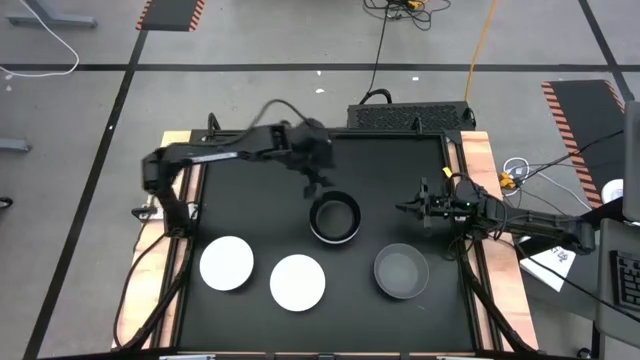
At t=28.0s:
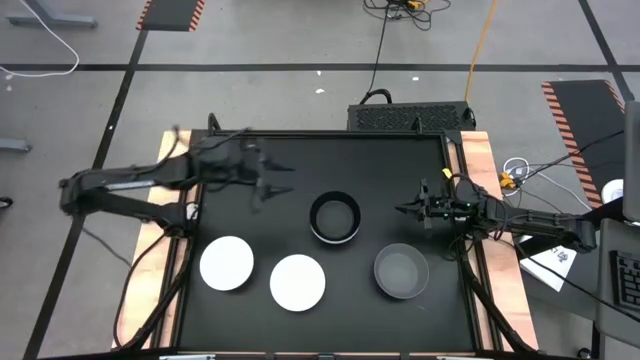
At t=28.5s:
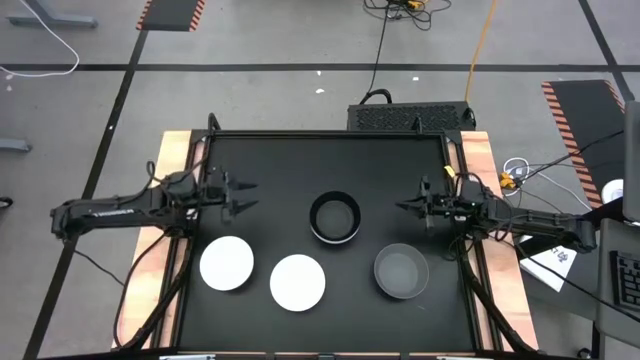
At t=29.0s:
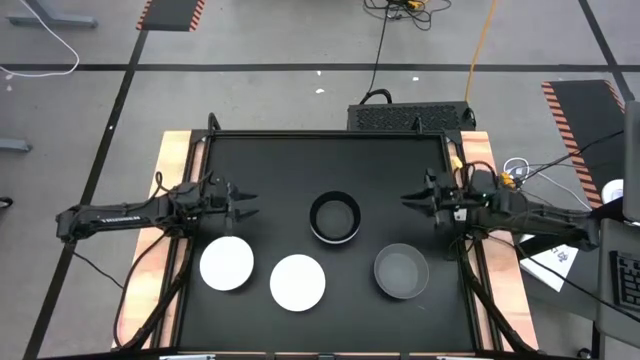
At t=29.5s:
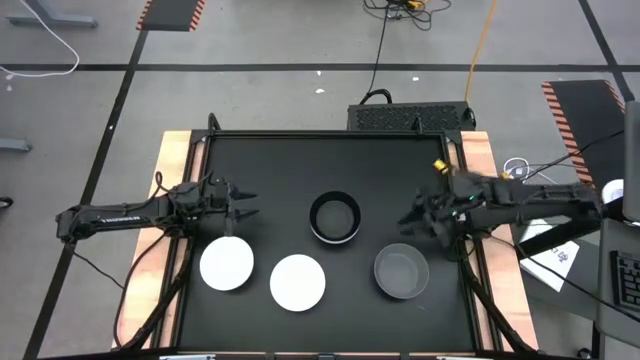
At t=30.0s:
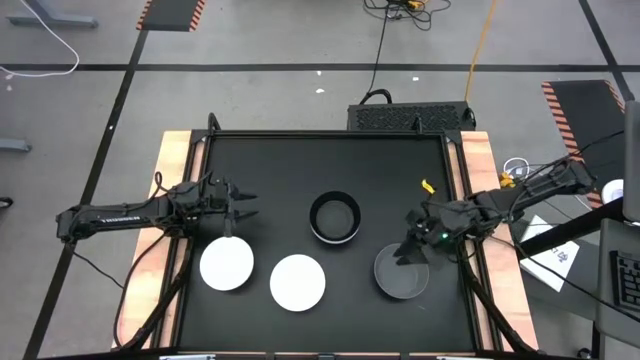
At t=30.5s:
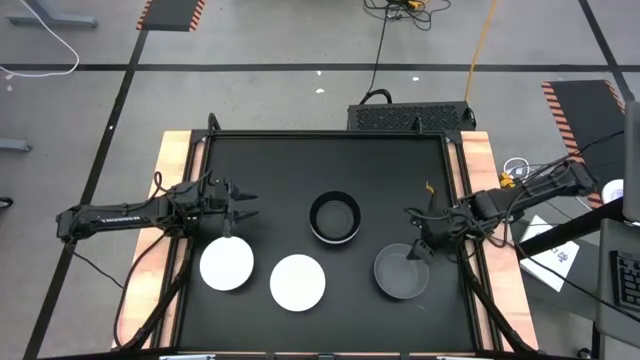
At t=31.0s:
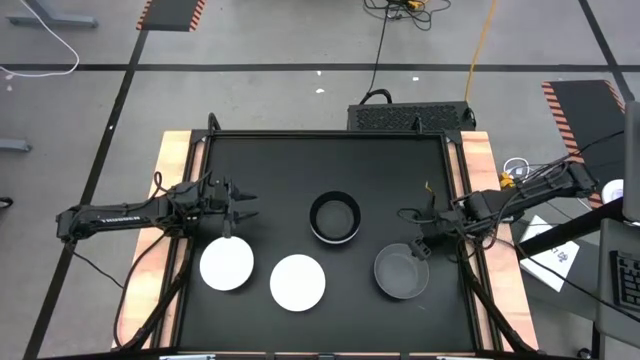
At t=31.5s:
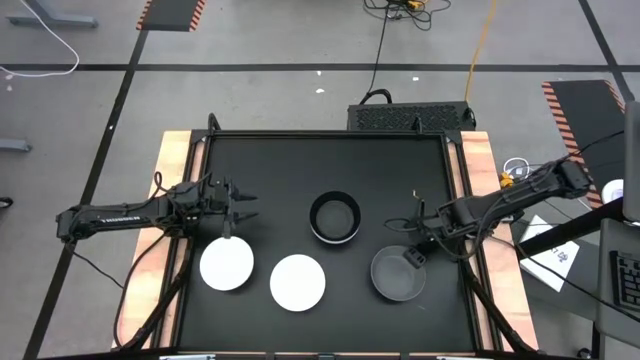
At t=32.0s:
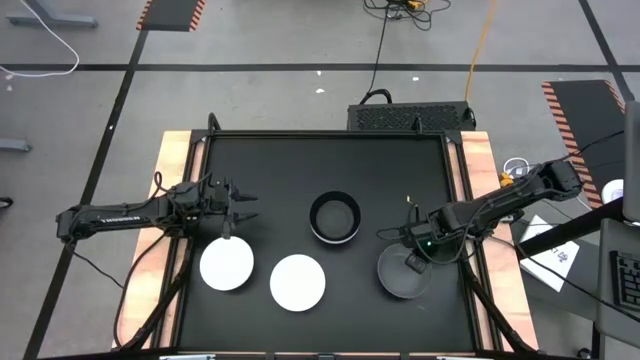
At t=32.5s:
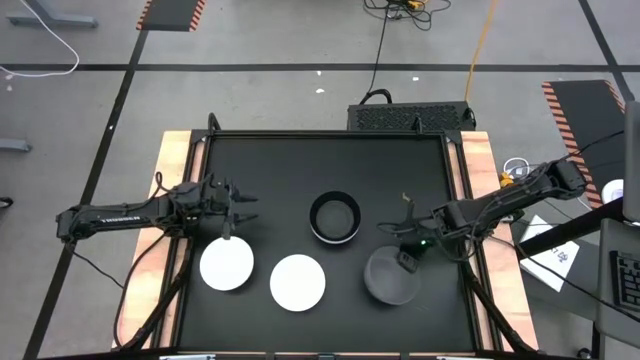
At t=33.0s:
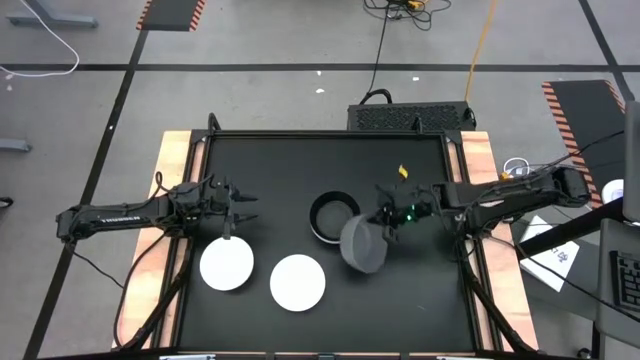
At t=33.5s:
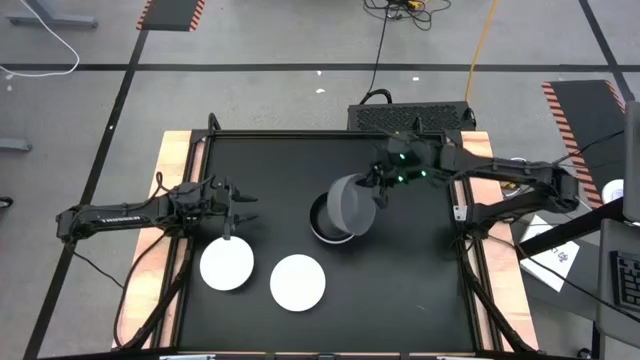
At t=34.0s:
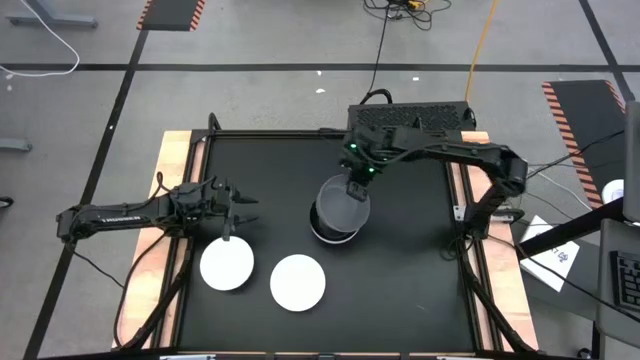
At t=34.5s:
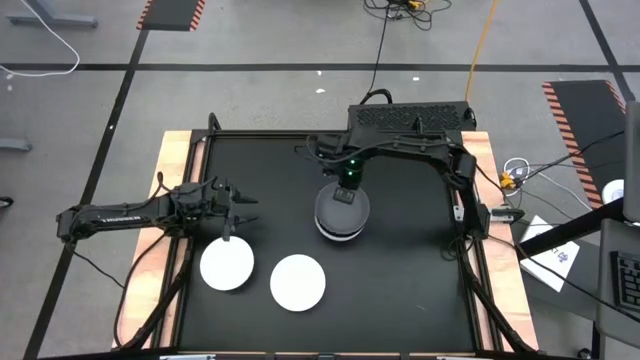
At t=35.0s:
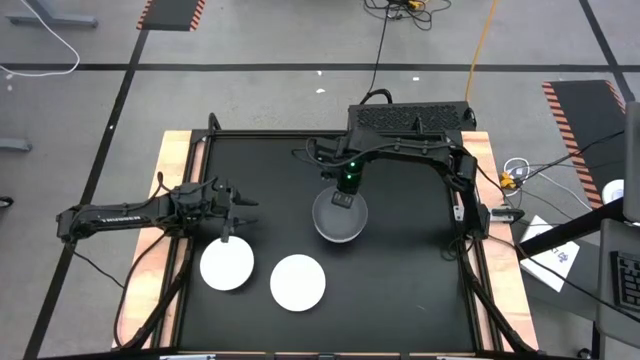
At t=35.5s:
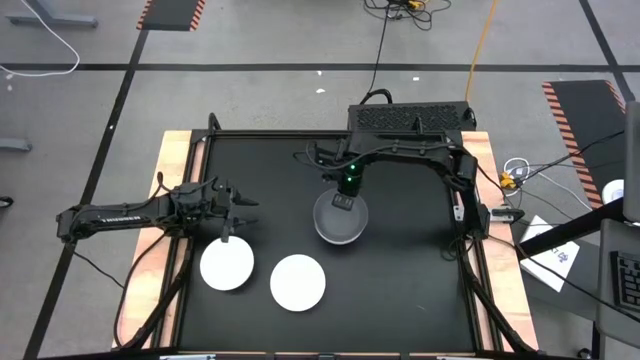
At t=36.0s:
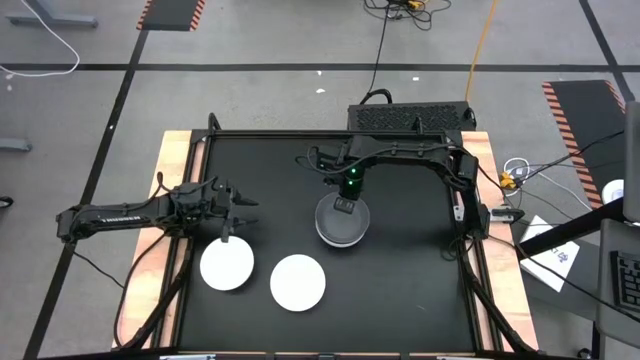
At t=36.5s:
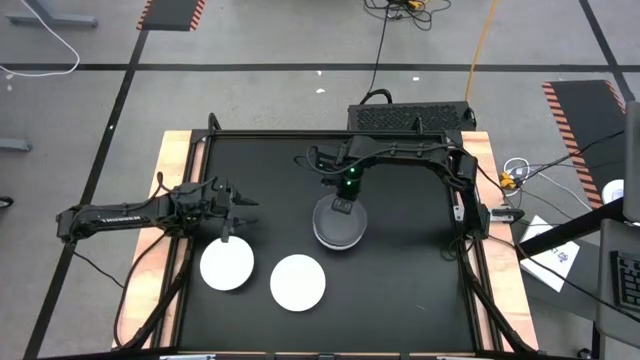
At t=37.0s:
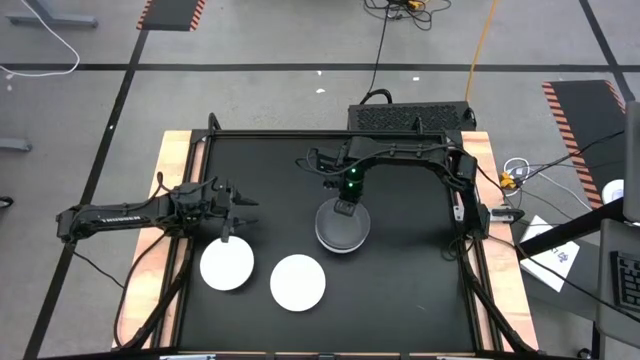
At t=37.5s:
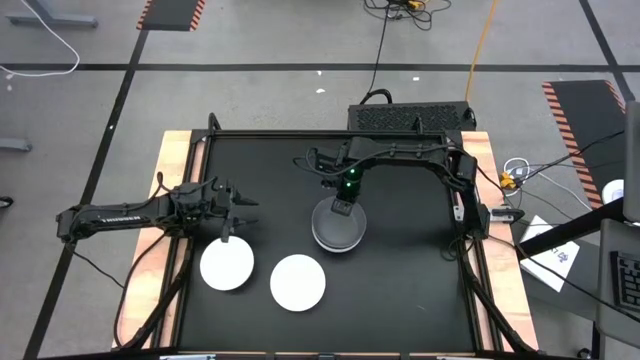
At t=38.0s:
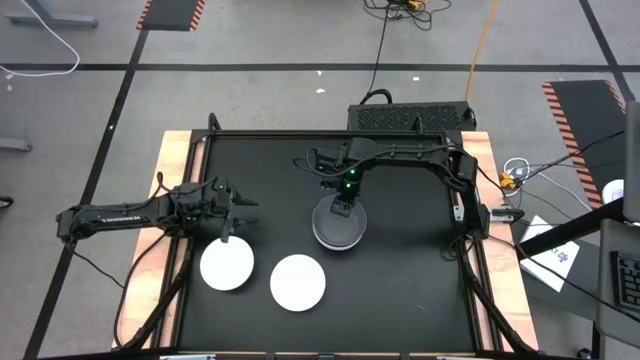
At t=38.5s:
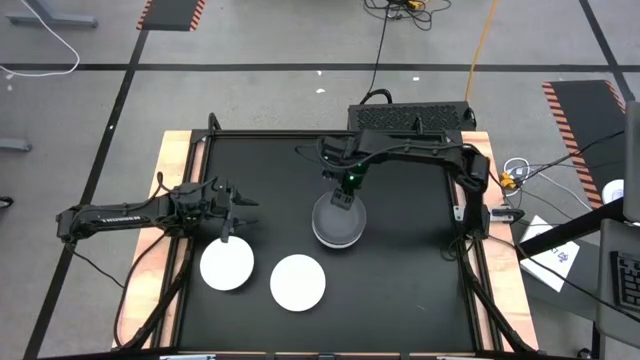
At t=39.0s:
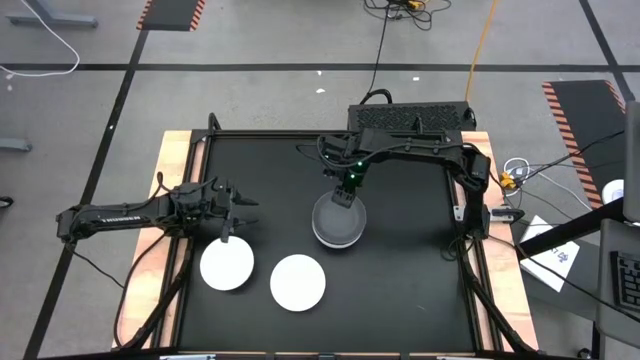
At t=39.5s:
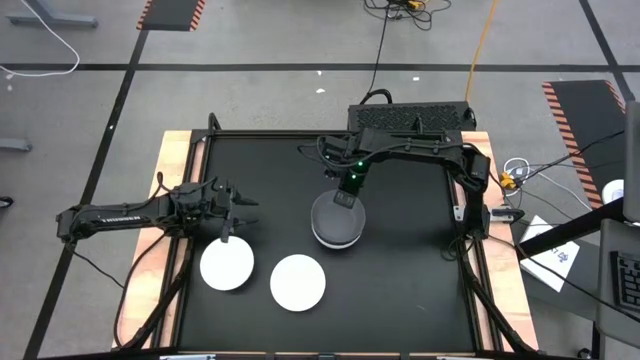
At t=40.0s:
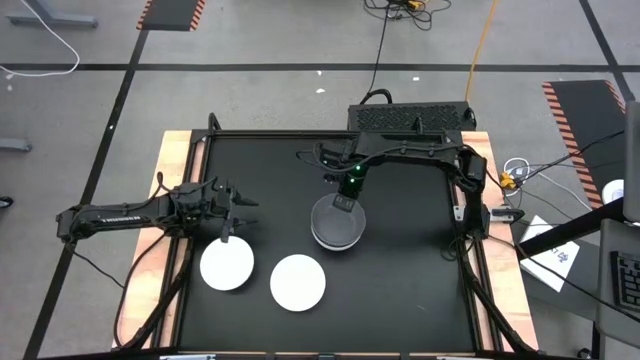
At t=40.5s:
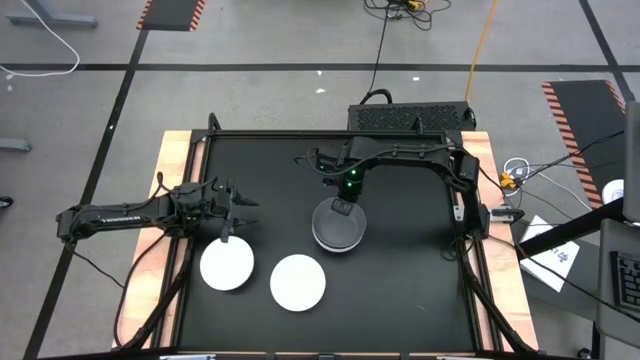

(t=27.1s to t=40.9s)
Task: Nest bowls inside each other
Stack the dark gray bowl on the black bowl

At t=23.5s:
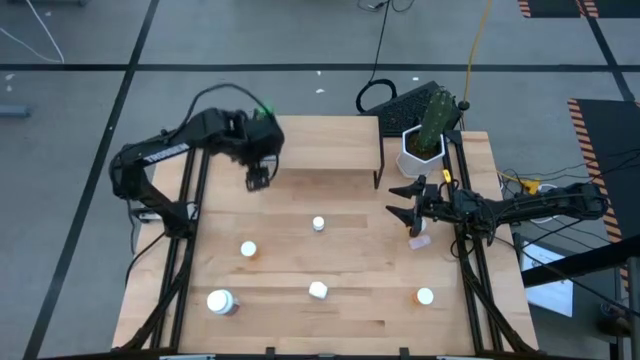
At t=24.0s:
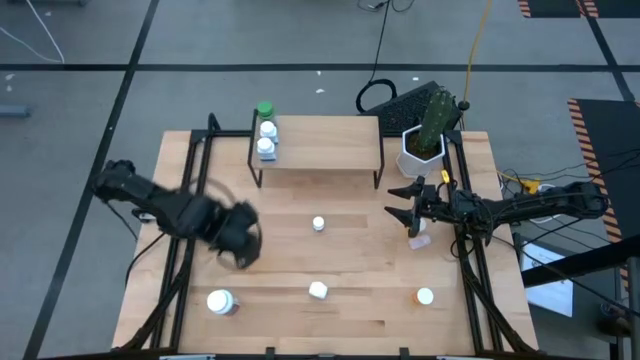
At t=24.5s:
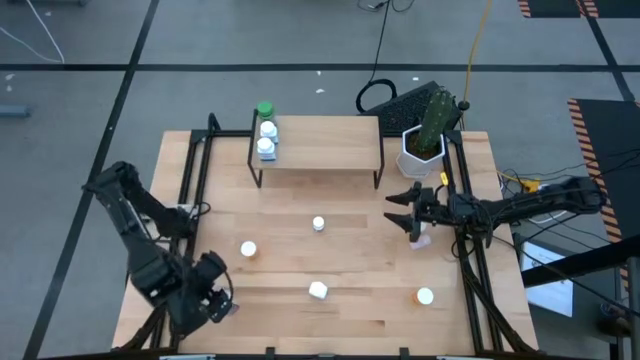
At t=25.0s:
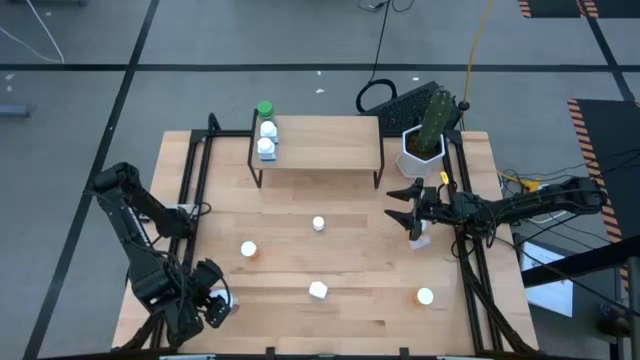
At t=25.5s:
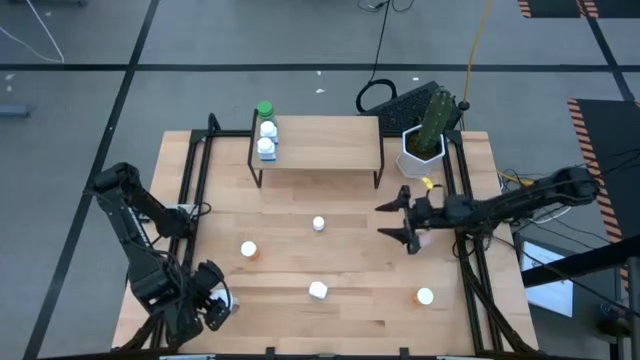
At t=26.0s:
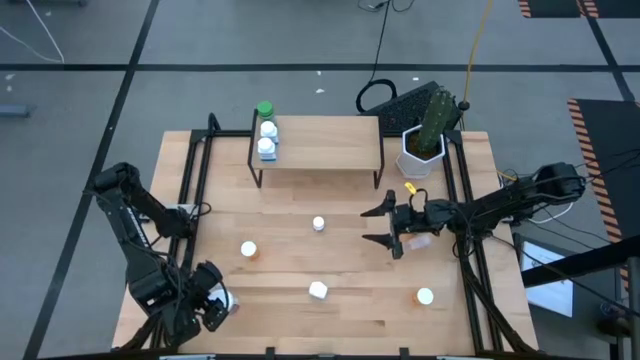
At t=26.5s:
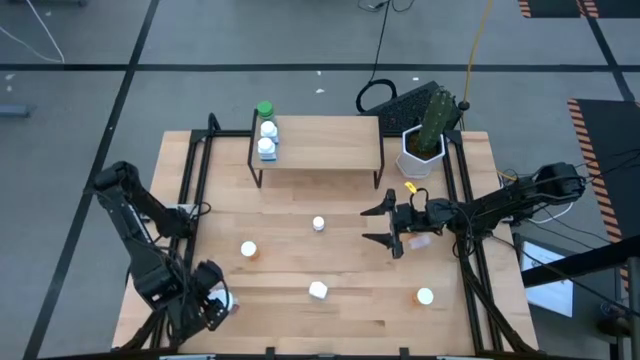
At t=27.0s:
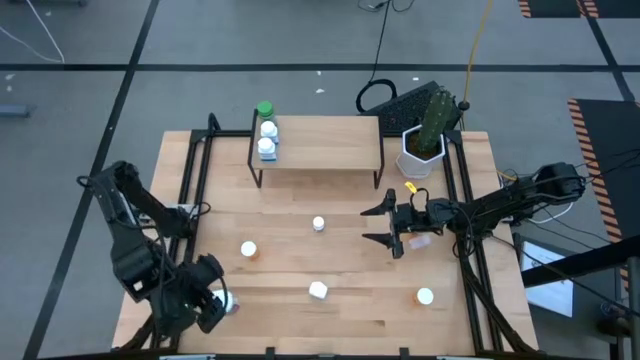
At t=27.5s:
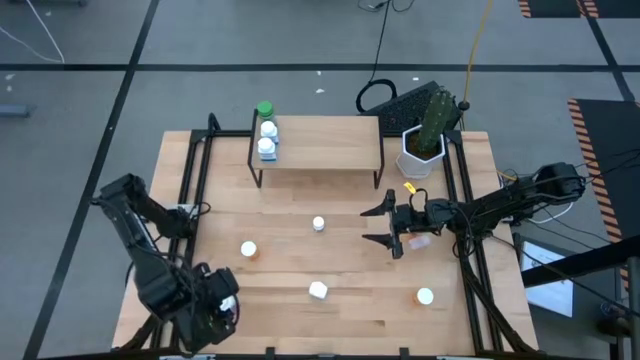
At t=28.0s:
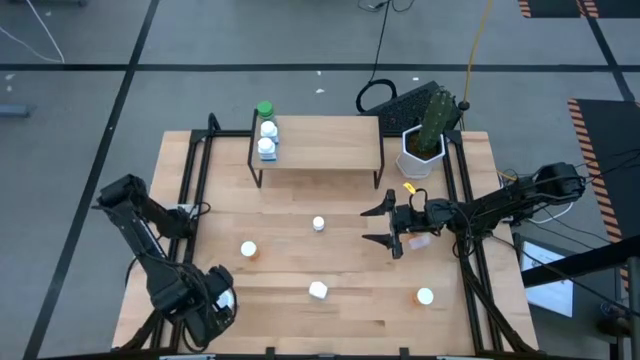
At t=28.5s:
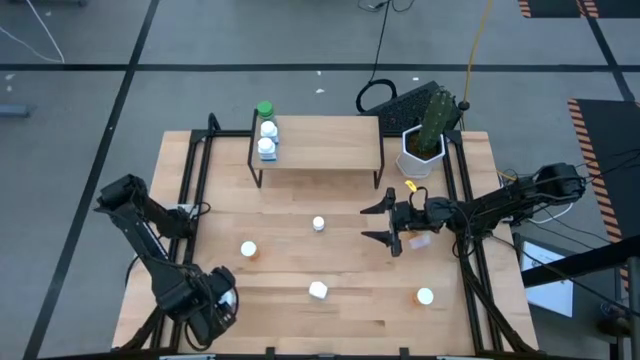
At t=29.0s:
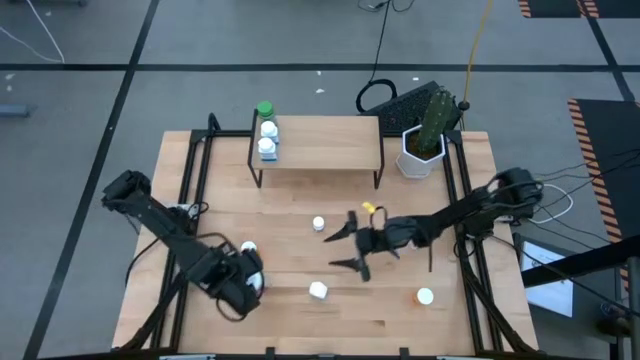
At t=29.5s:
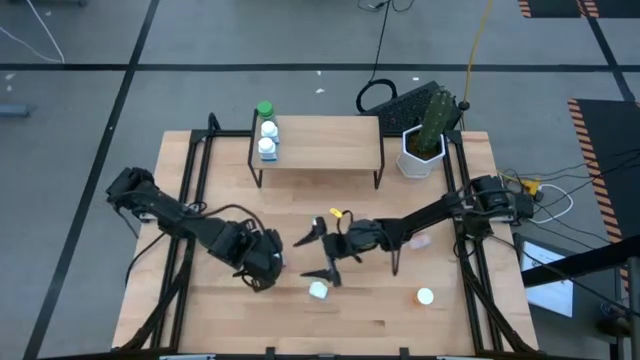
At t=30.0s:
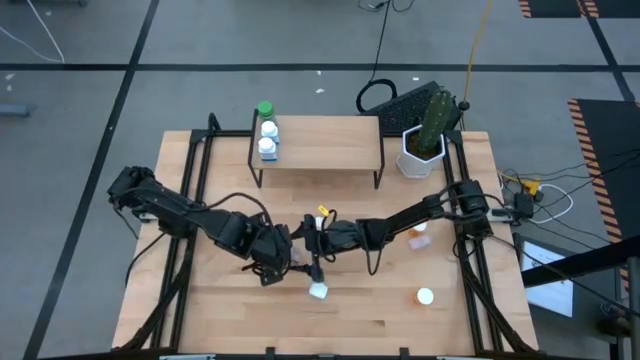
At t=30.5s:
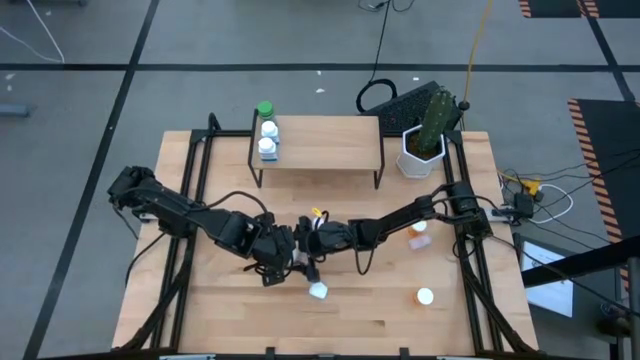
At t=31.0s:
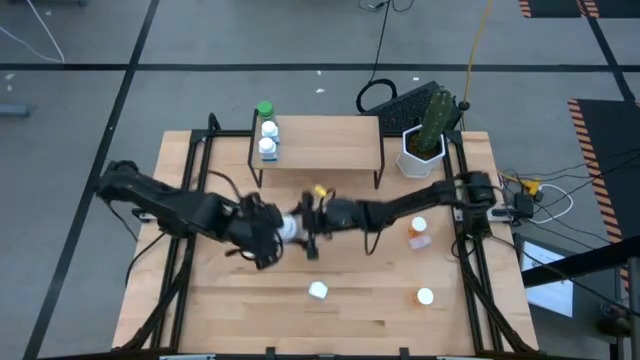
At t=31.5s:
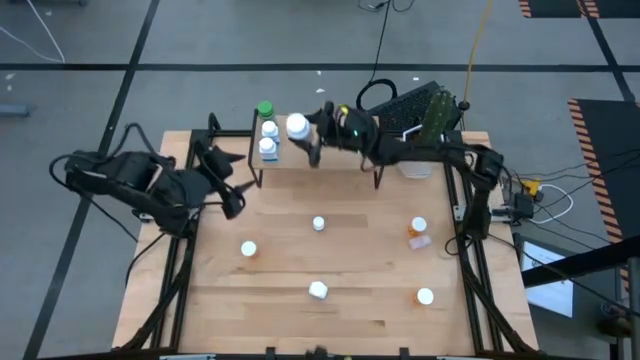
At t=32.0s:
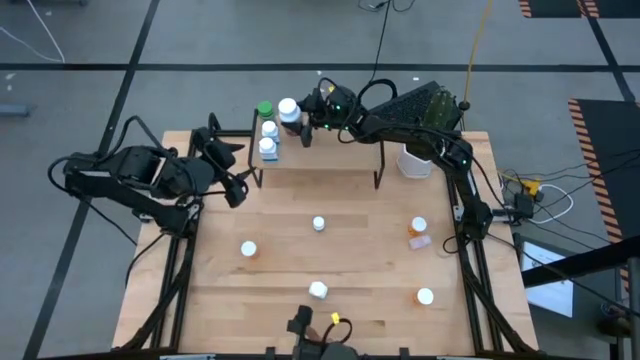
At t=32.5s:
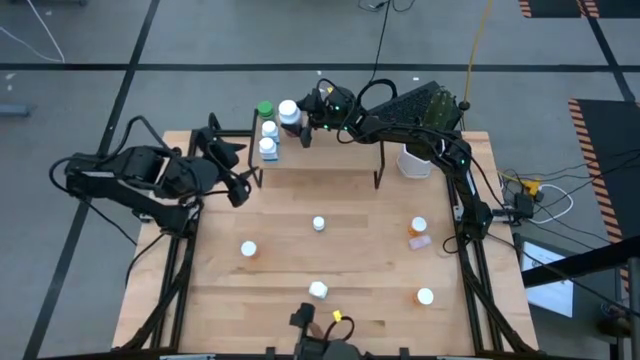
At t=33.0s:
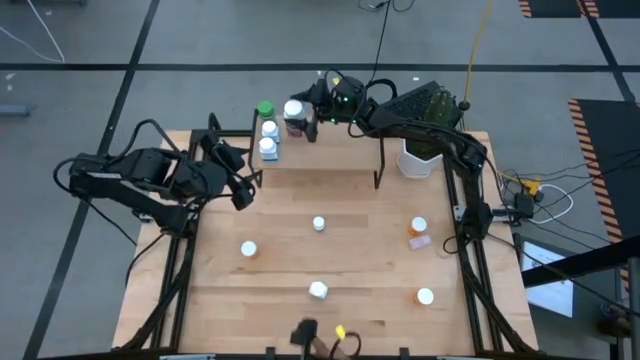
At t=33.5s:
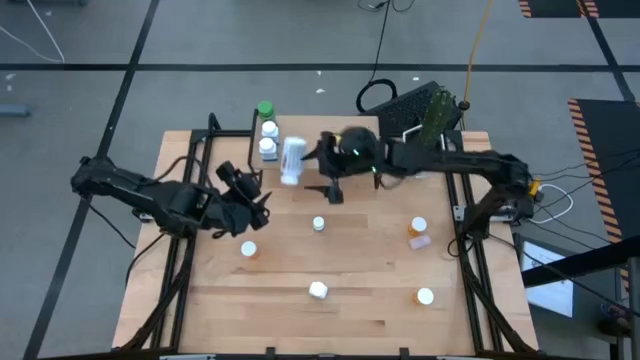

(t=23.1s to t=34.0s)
Task: Pick and place medicine bottles onto shelf by color
Put the bottom left white medicine bottle on the shelf
